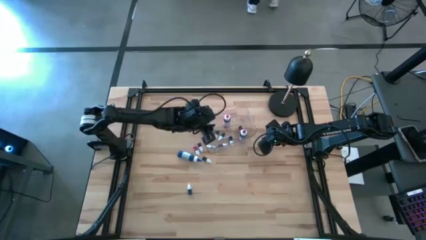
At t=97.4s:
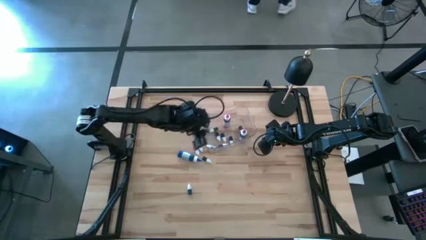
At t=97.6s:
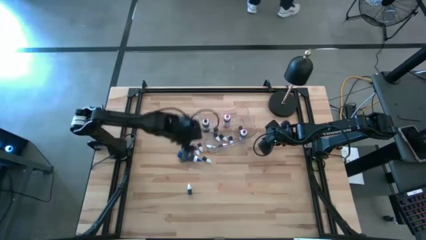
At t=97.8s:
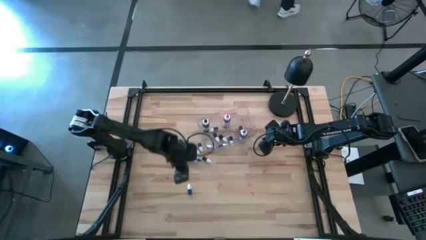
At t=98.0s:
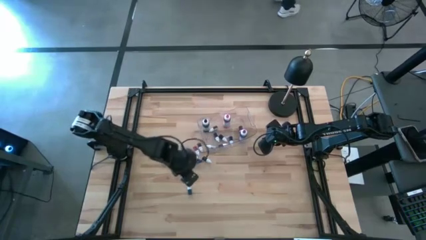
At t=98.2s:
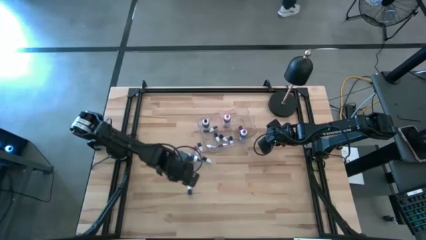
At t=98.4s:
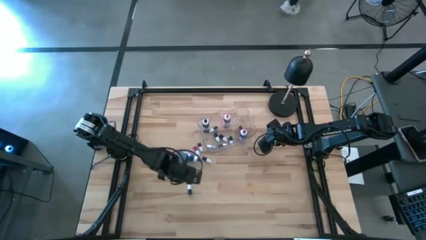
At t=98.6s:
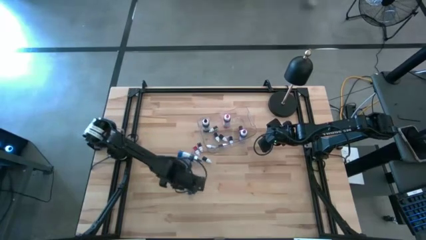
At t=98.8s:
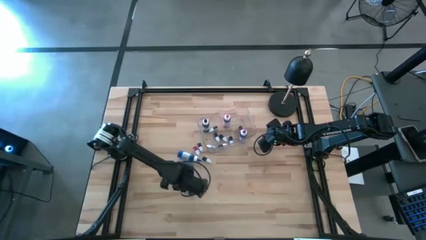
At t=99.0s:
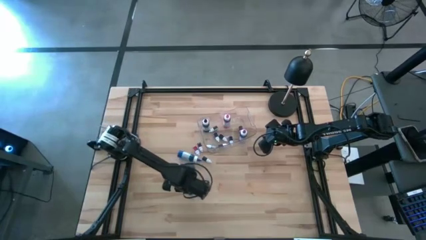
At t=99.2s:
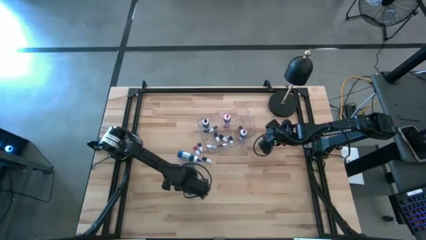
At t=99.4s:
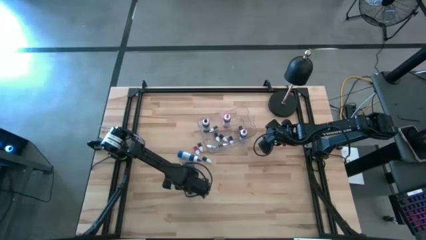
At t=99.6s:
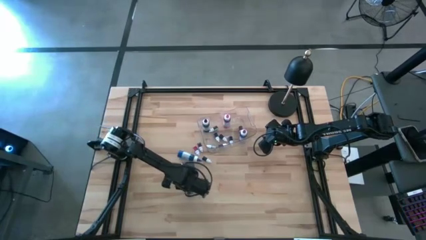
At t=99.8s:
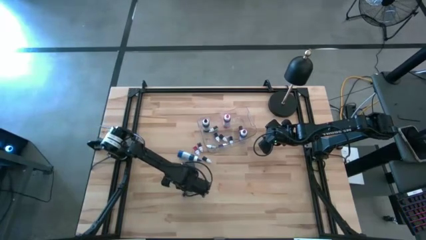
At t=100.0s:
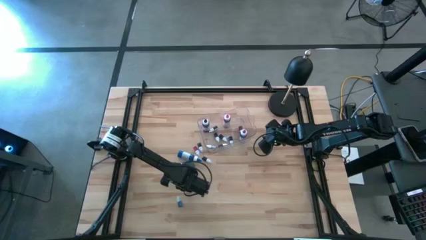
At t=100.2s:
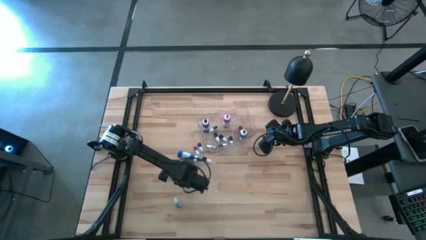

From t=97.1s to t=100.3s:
Task: Pick & Place food coloring
Put the small blue food coloring bottle into the transparent container

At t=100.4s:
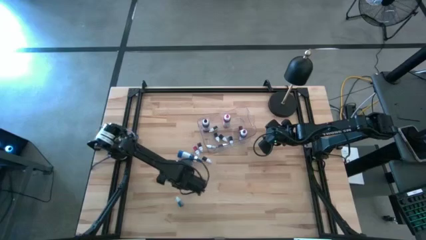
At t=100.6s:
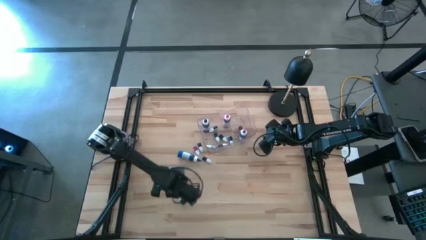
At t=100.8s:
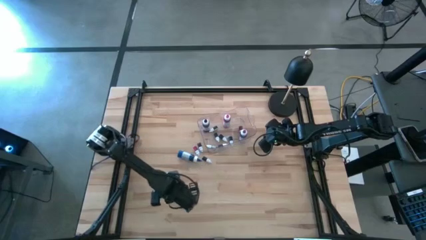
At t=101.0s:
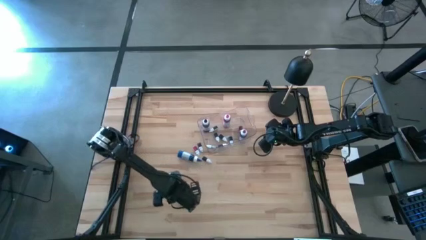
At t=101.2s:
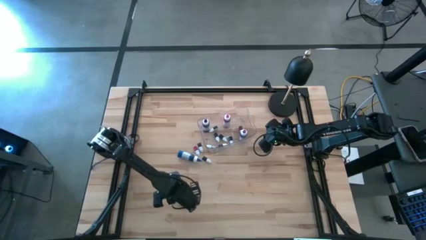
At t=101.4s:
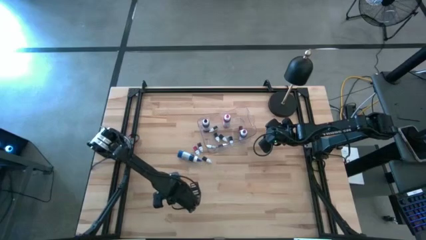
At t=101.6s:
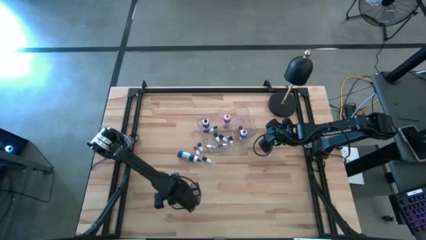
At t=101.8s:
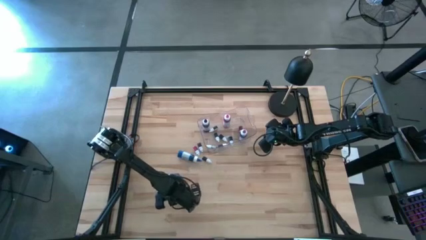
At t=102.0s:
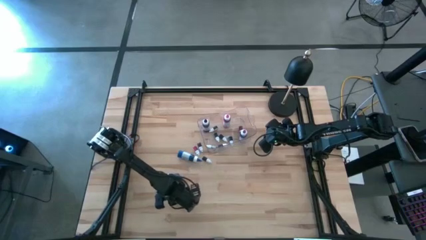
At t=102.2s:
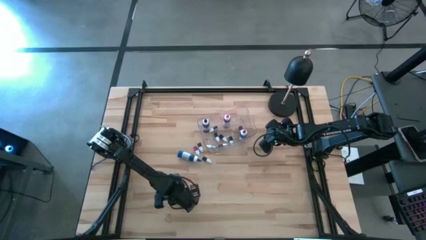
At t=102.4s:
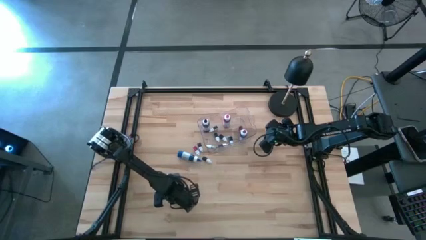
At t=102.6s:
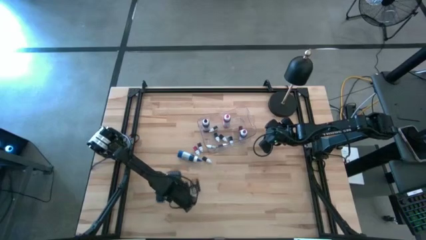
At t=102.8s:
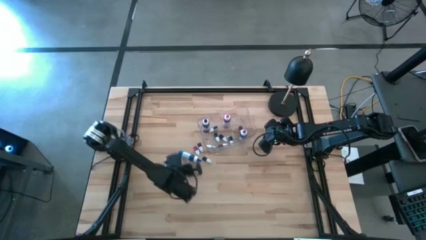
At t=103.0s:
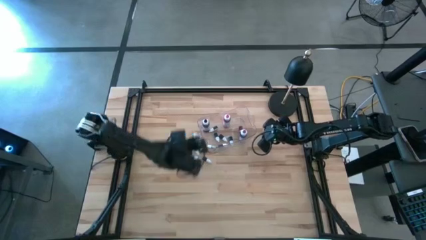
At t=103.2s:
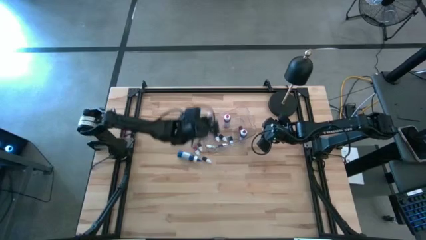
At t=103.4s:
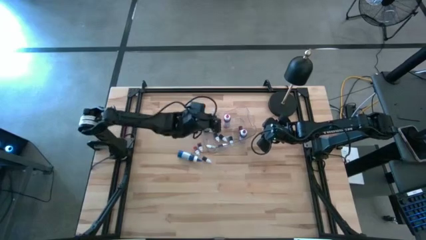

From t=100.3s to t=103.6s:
Put the small blue food coloring bottle into the transparent container

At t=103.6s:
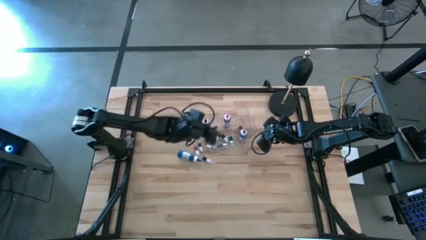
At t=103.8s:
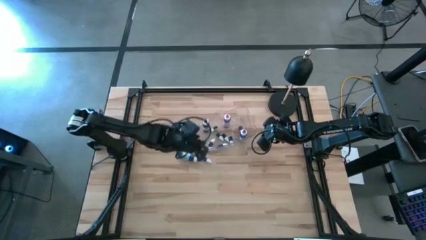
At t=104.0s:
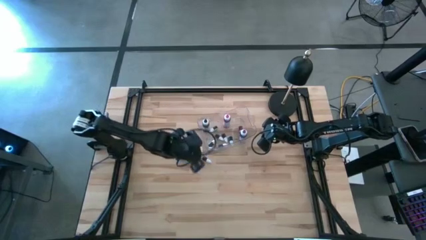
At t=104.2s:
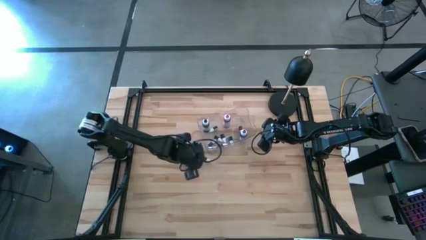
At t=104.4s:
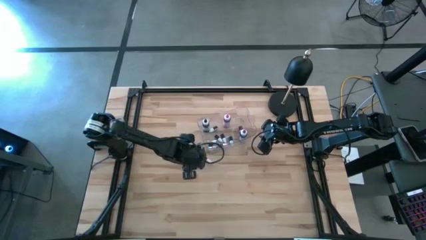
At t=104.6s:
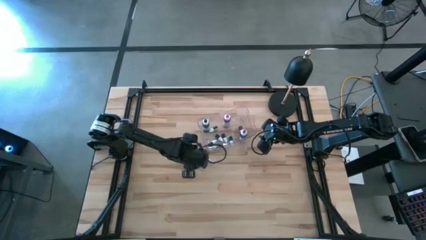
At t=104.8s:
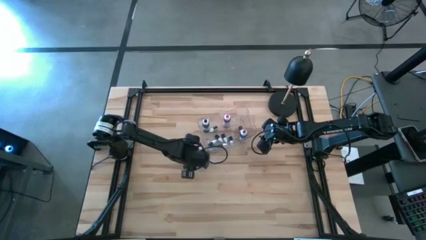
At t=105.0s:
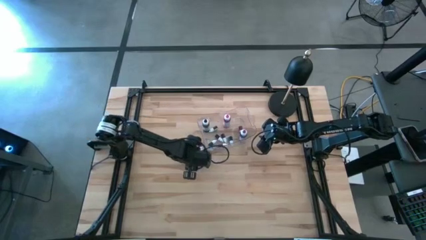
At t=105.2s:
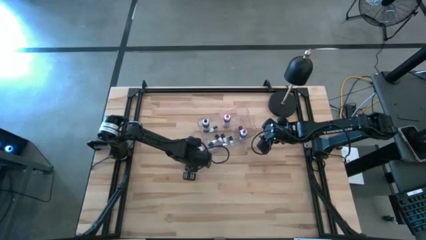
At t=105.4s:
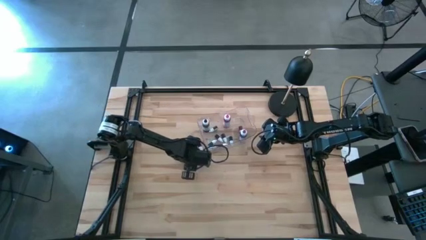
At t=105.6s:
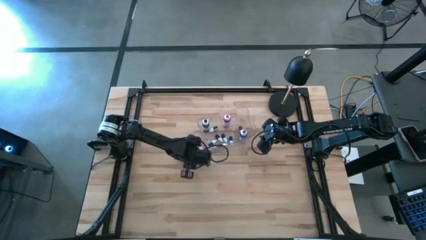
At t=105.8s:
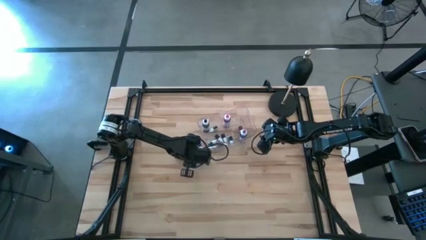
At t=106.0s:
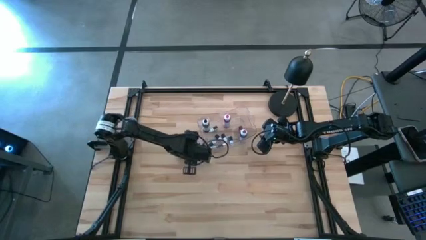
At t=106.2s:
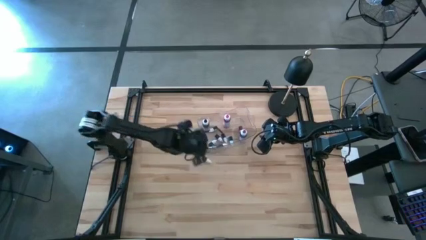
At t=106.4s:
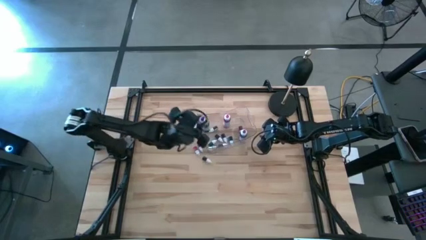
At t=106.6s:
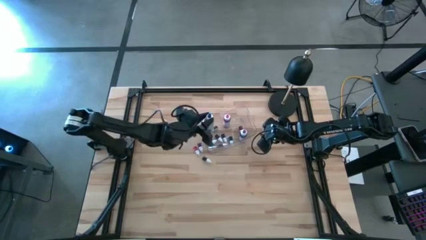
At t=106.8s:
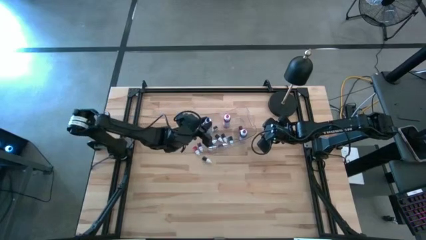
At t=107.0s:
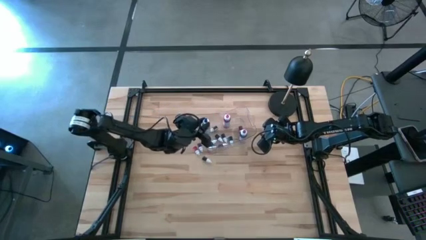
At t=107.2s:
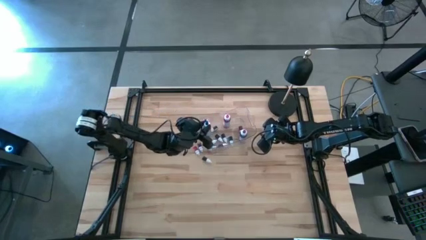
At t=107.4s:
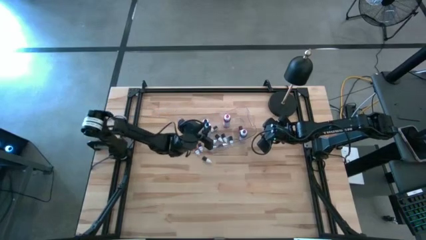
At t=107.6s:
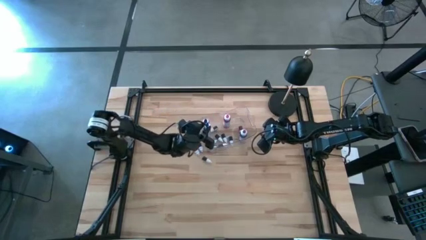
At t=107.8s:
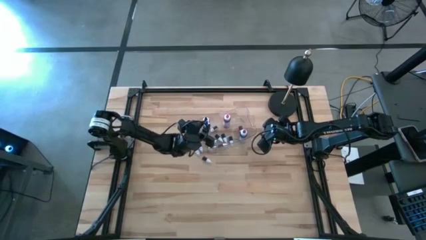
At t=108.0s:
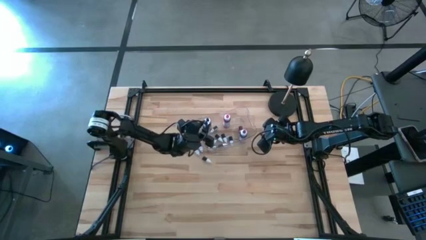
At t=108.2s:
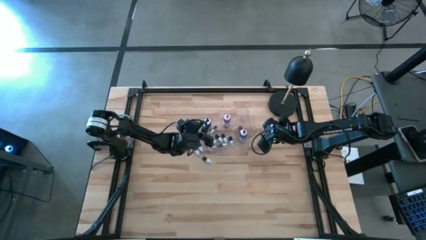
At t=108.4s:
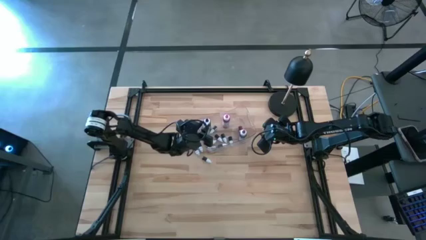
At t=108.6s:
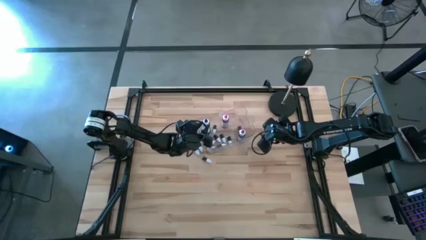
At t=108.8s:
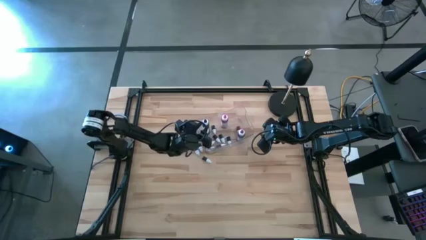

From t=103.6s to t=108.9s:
Put the large blue food coloring bottle into the transparent container

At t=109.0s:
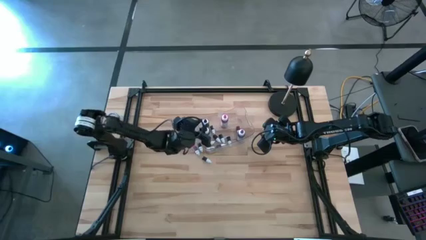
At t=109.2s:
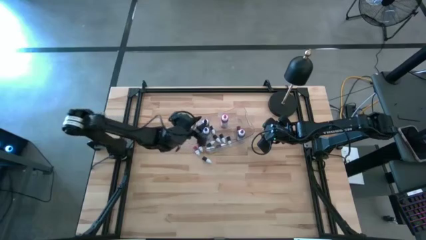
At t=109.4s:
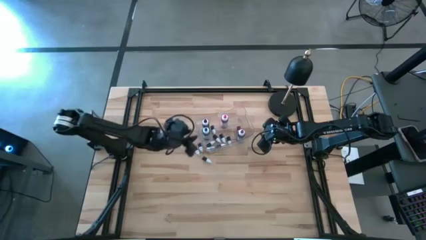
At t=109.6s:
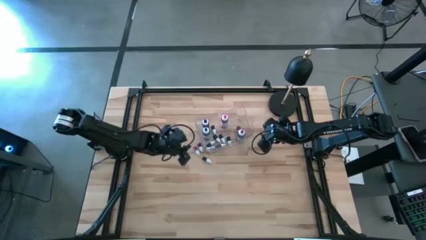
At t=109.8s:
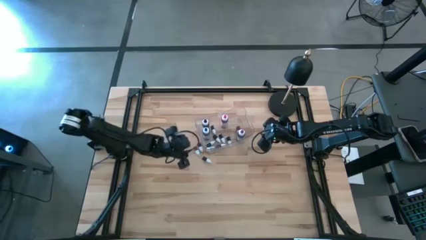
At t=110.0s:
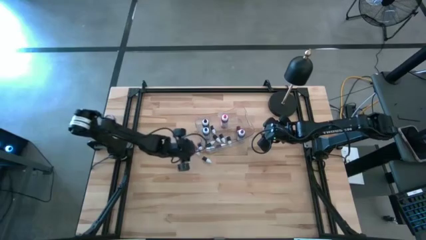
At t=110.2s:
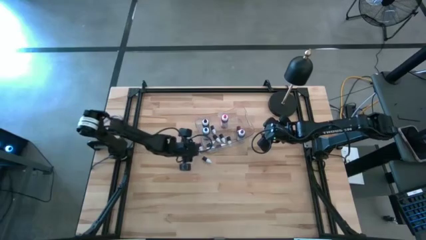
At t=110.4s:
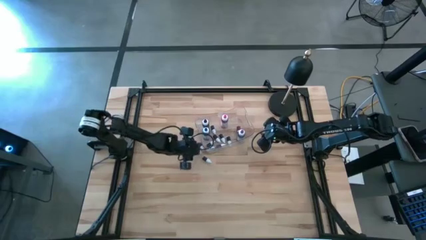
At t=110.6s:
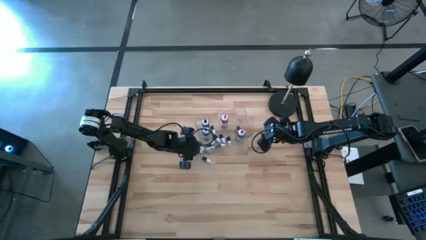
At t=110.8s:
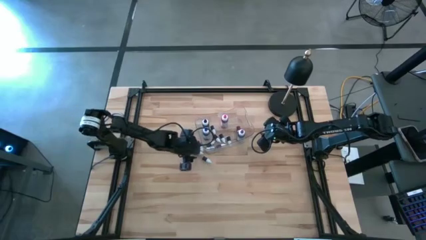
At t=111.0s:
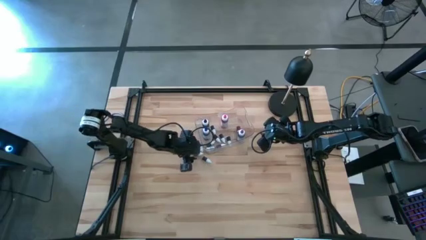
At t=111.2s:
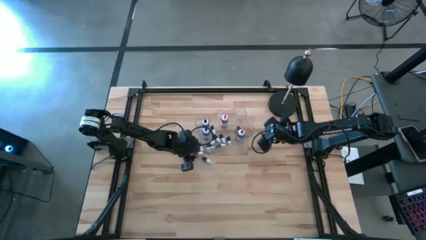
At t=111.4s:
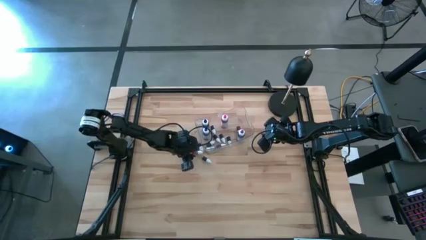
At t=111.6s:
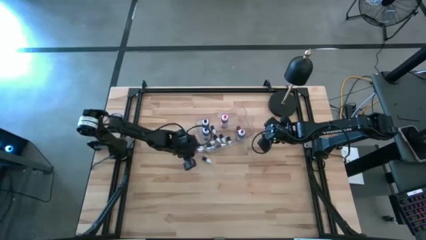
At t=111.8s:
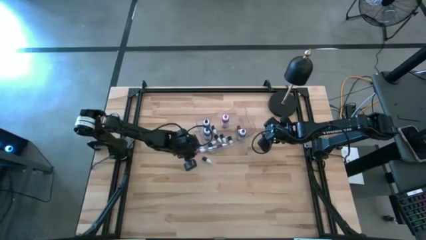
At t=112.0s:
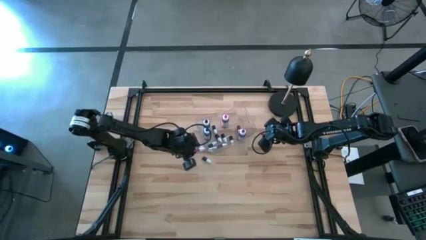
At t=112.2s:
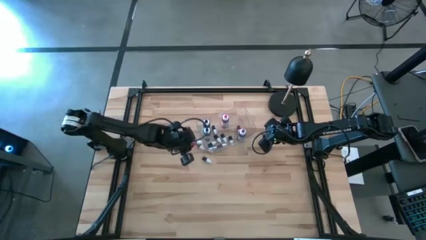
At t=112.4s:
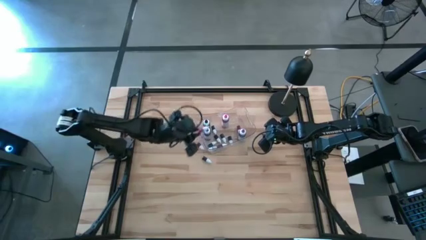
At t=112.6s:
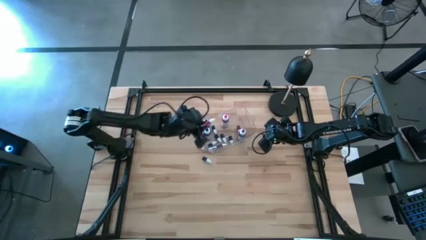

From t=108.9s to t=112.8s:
Put the left small red food coloring bottle into the transparent container
